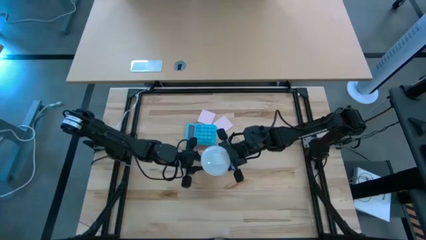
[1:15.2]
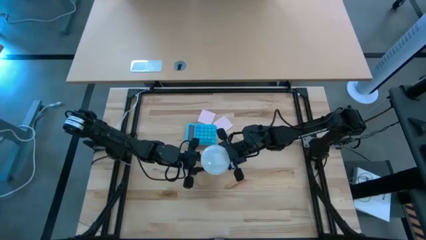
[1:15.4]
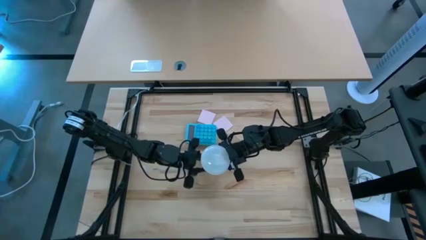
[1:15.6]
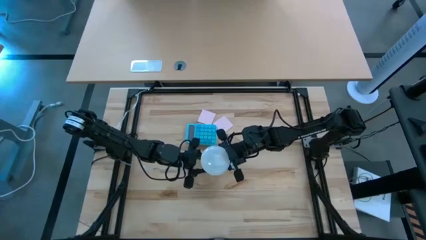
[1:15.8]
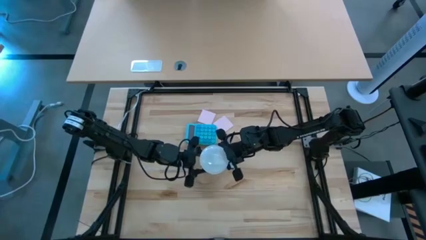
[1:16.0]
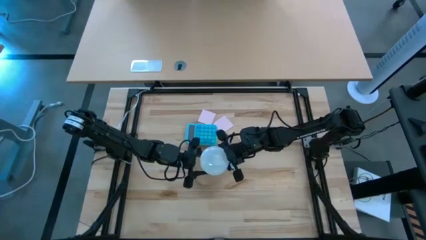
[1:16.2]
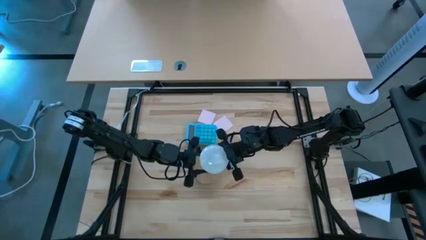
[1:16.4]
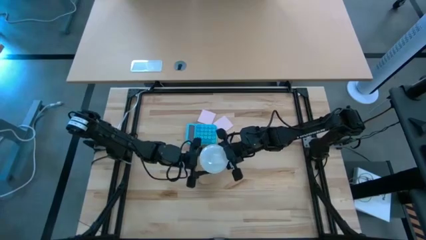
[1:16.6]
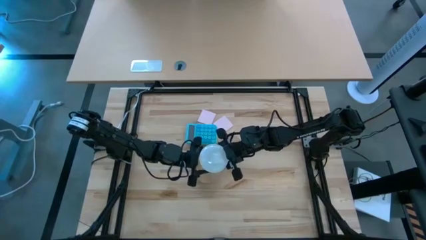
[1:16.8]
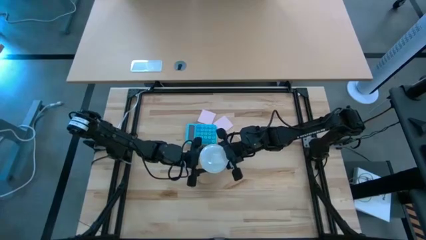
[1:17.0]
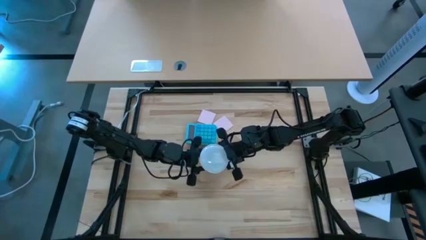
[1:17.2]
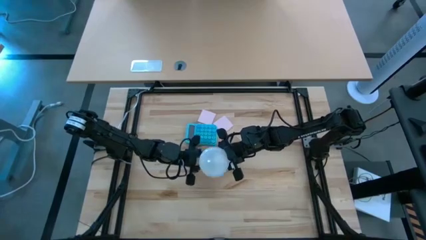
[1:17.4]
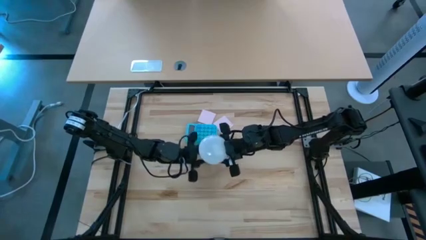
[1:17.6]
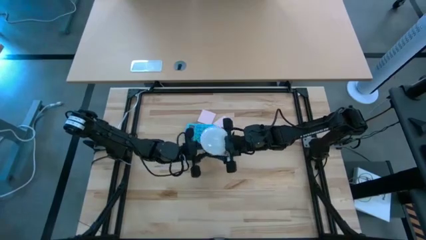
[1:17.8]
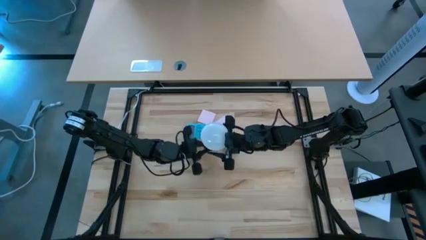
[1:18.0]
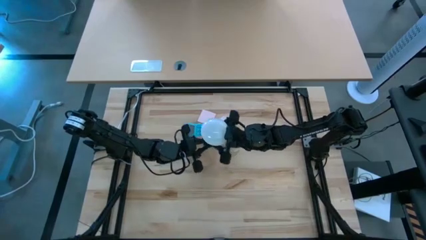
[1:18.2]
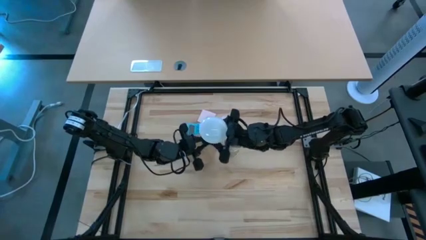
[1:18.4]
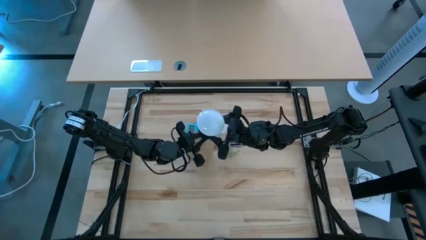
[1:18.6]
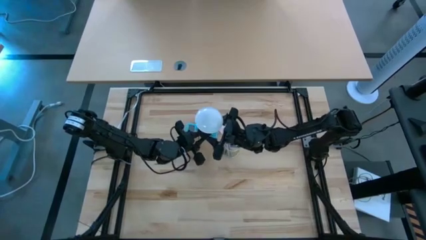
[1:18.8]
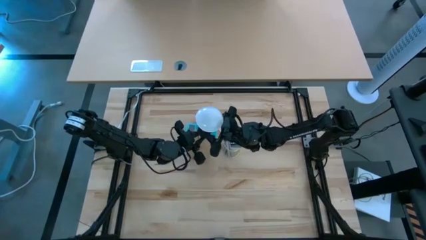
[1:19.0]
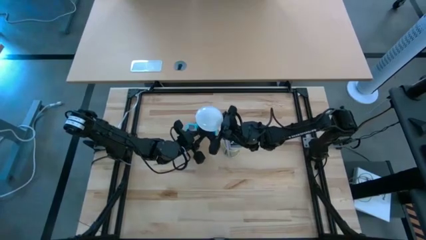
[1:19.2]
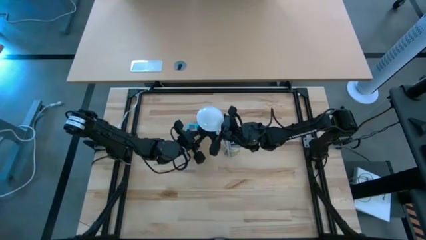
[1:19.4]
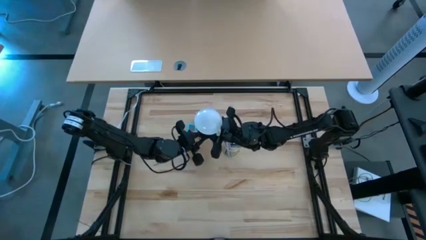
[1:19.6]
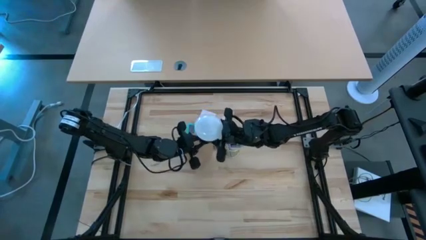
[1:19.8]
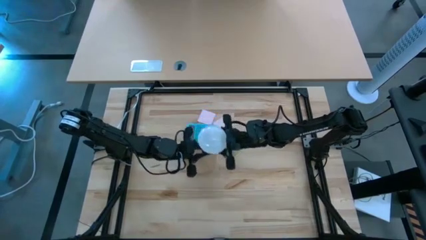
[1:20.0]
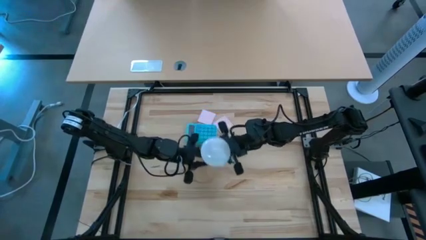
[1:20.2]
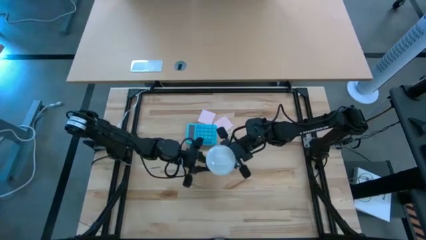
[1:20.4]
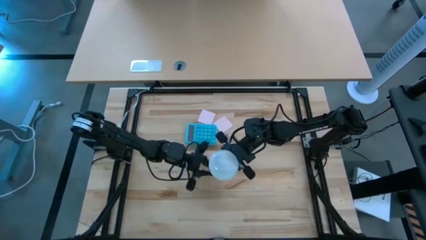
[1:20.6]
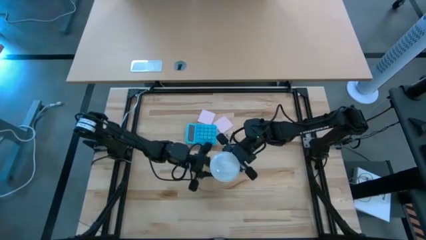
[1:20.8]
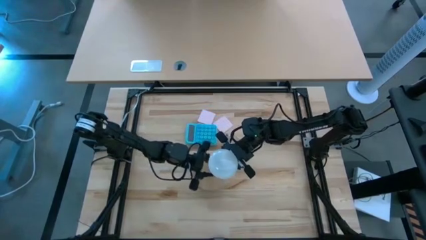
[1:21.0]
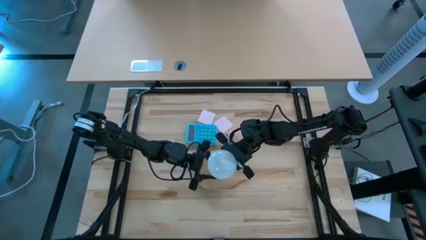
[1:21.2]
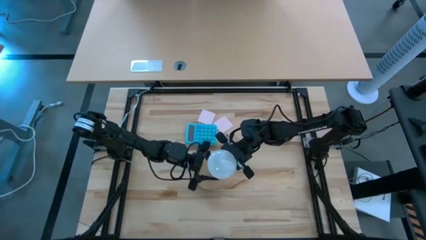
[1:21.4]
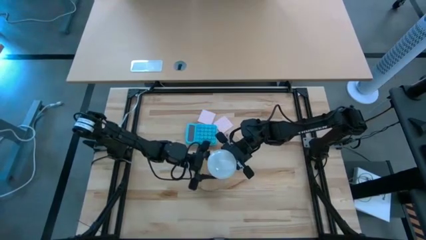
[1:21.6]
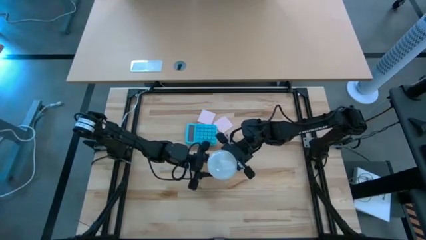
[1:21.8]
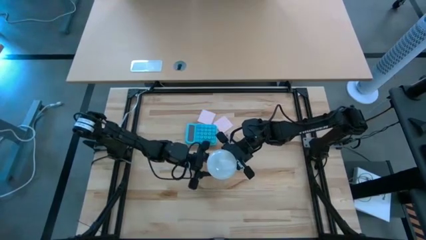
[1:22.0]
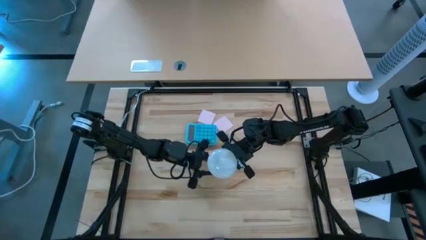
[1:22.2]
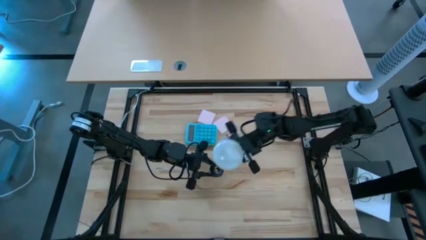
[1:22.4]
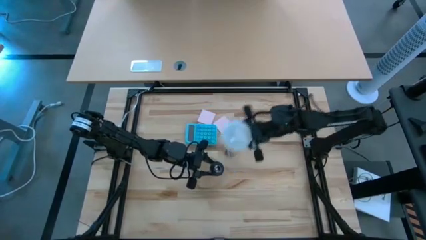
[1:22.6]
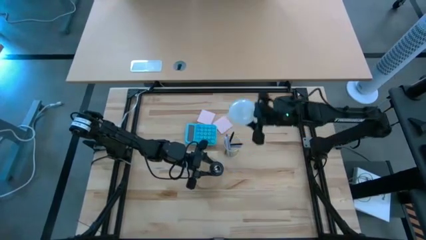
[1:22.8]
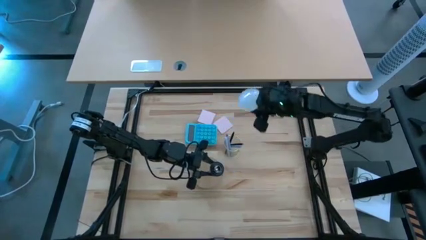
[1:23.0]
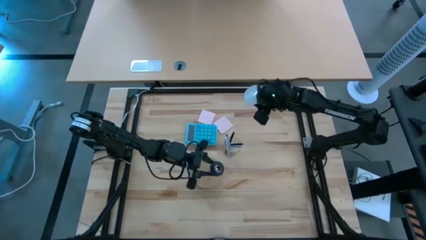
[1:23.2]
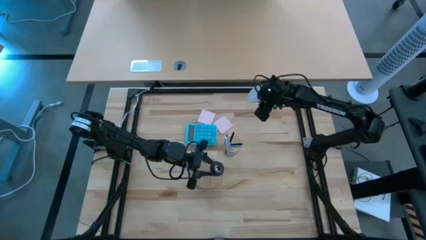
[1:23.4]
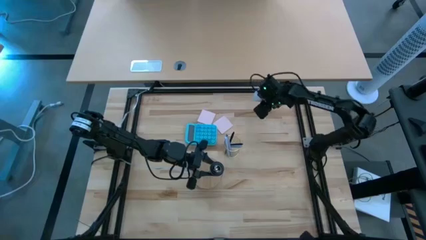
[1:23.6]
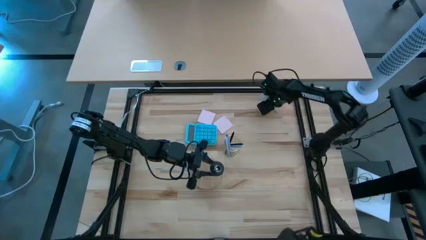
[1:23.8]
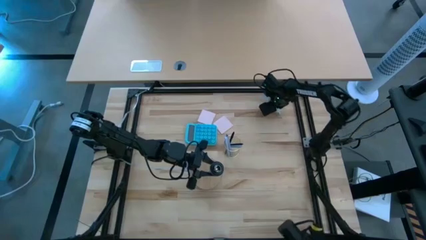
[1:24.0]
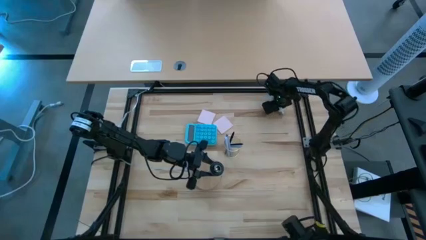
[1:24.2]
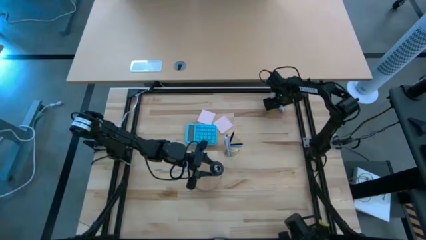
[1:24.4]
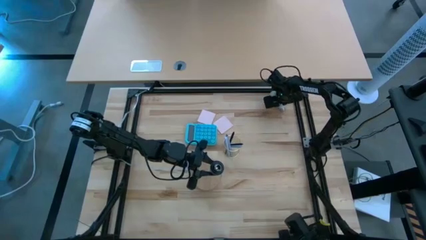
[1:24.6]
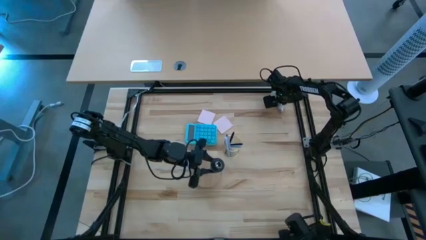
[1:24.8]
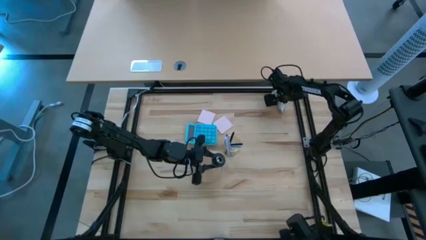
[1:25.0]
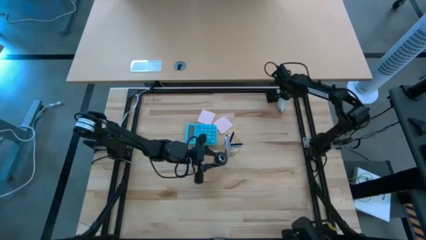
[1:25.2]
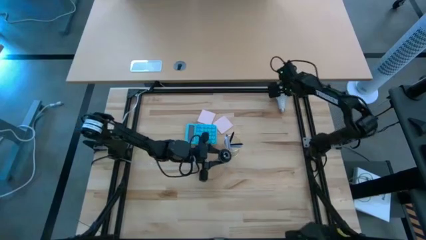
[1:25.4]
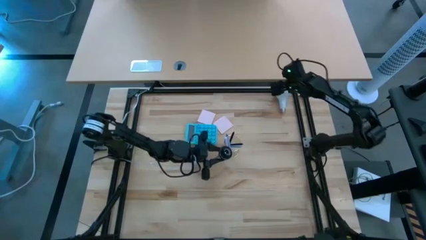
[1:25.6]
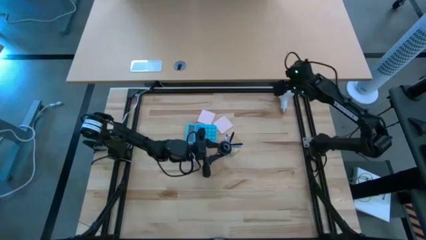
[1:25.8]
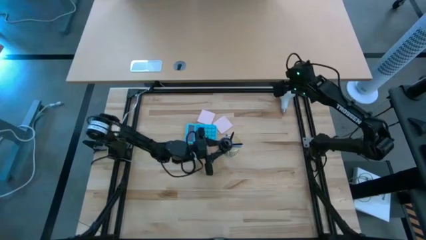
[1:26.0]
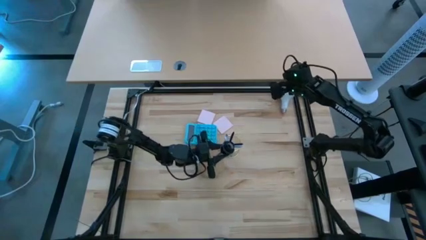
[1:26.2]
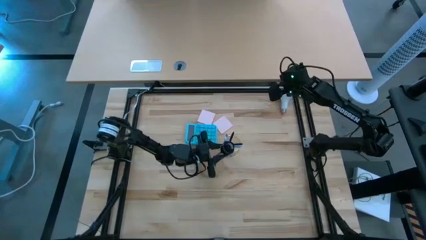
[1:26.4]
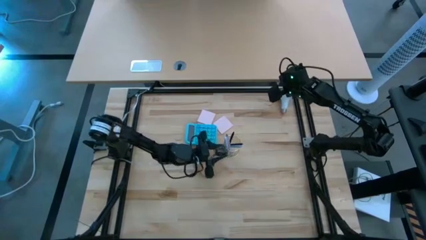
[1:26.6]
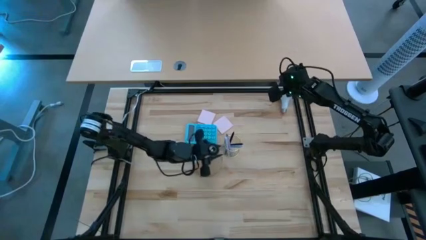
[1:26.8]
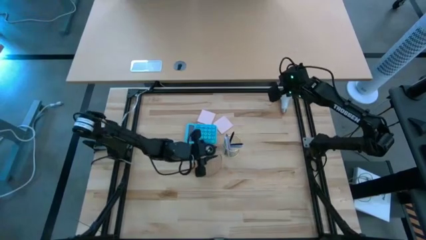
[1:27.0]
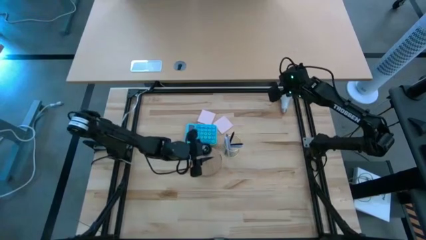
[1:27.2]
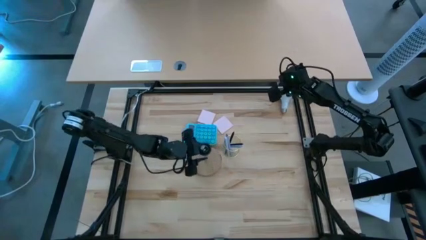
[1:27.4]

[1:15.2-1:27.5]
Task: Screw lightbulb
Remove the lightbulb from the black table lamp

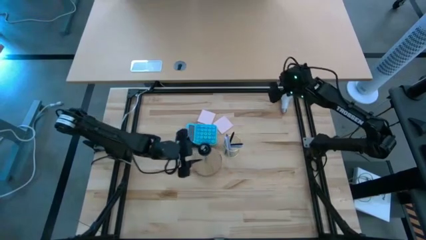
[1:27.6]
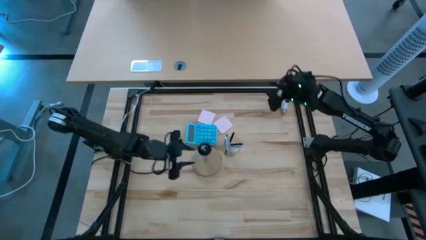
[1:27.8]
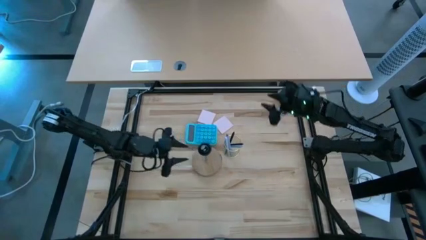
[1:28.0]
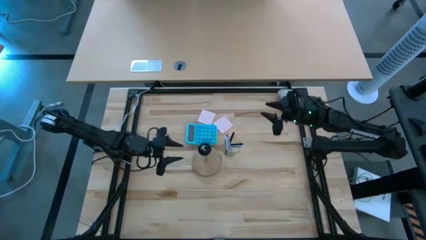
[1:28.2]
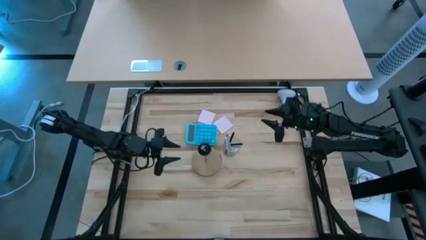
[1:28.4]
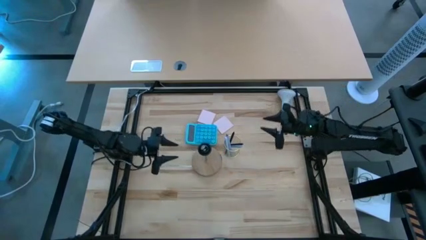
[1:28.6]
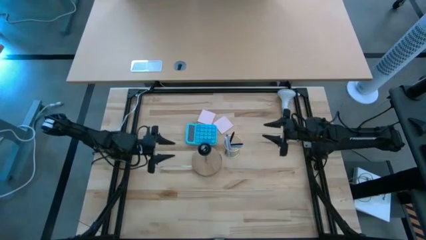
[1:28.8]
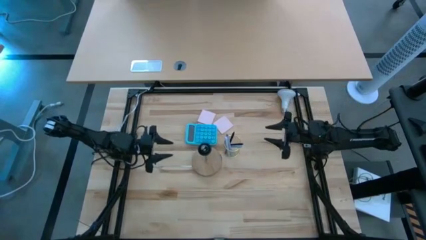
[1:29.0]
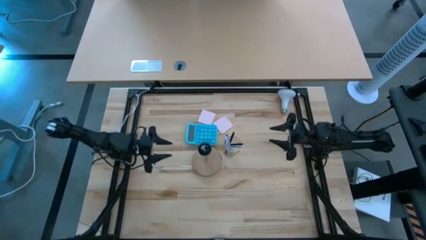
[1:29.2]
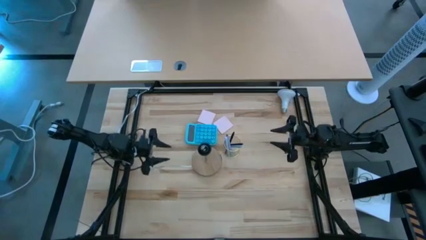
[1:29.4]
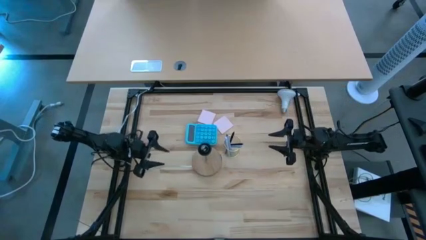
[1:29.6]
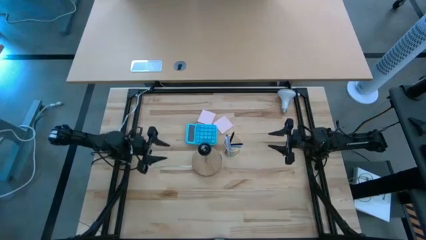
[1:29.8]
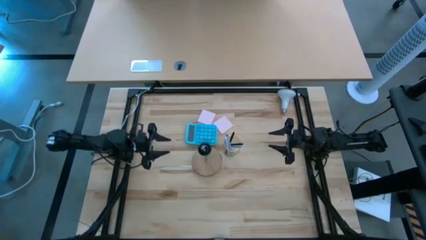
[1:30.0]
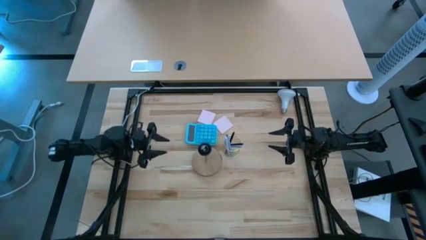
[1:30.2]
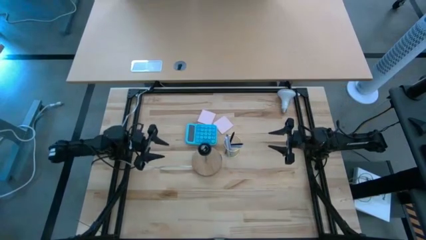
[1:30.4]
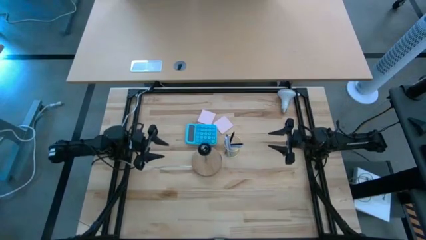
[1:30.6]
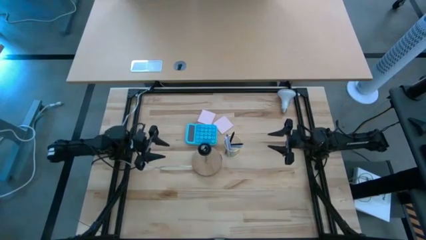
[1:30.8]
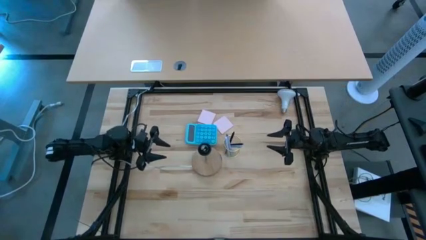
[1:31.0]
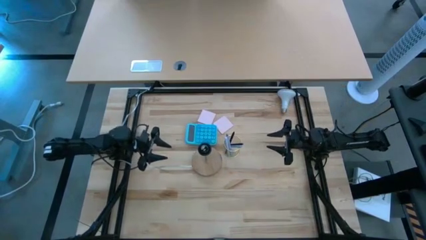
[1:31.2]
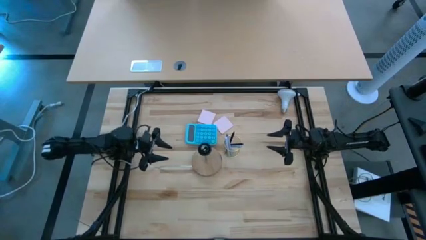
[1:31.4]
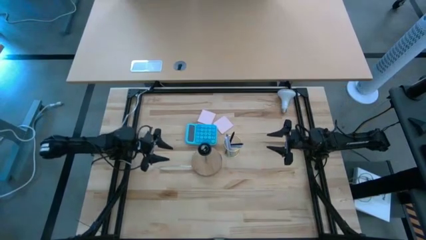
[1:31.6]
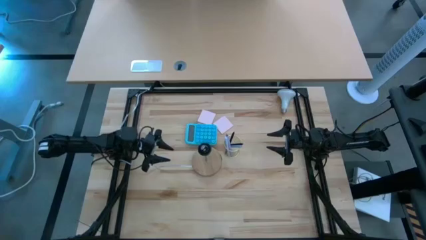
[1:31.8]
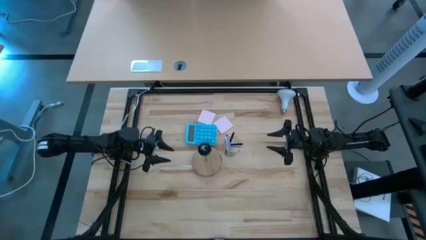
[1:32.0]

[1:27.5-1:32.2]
Return to Home Position
